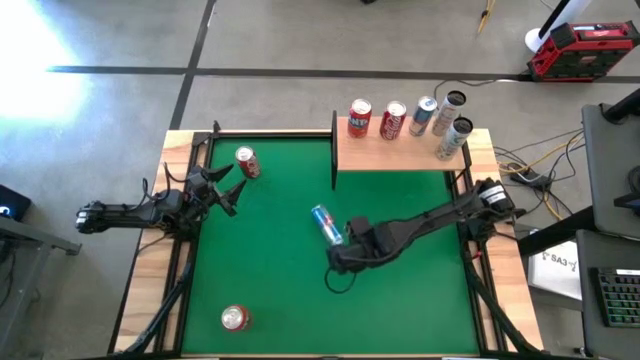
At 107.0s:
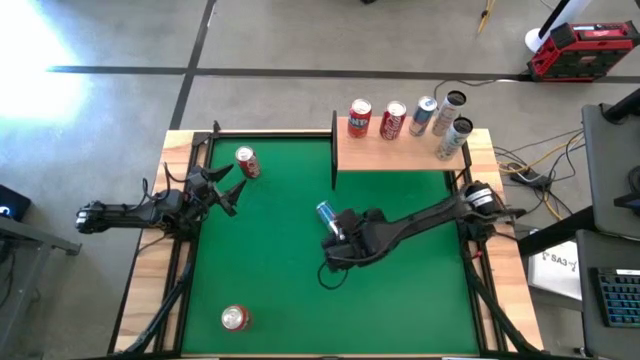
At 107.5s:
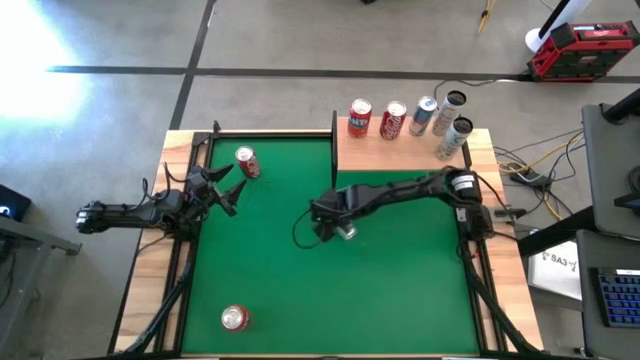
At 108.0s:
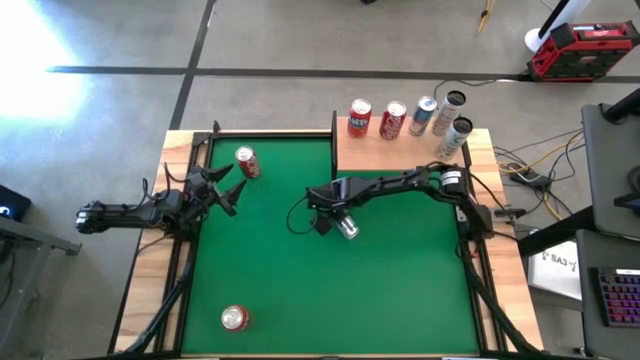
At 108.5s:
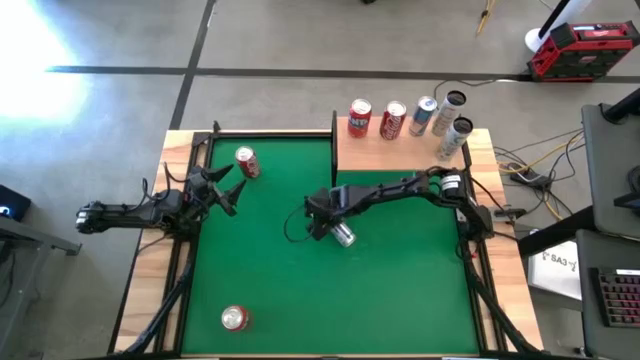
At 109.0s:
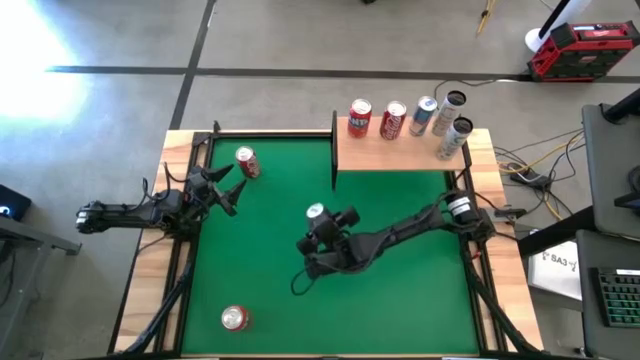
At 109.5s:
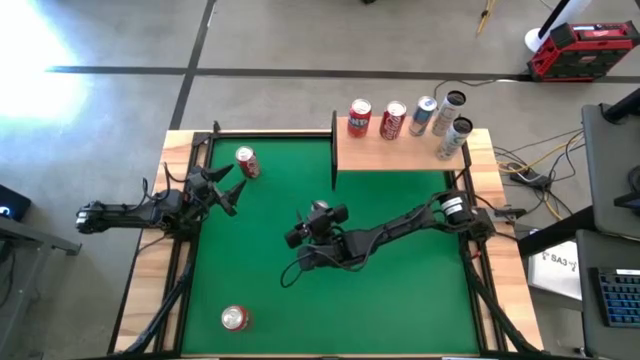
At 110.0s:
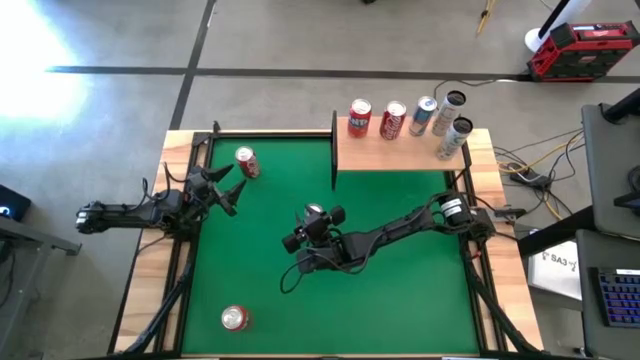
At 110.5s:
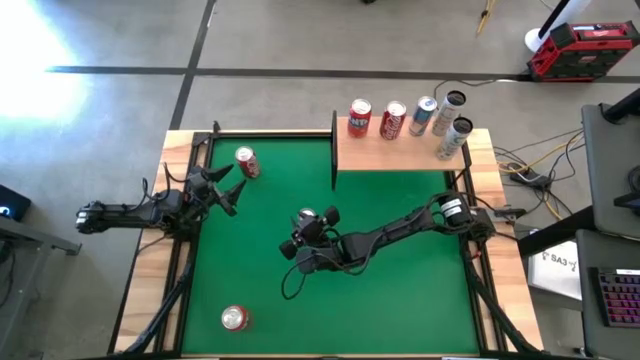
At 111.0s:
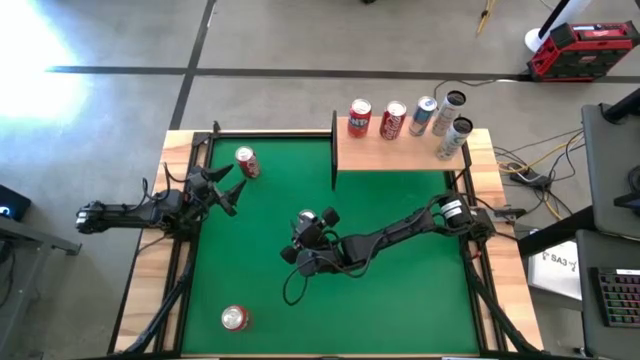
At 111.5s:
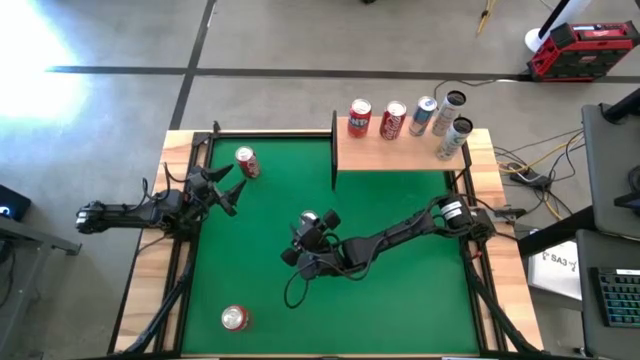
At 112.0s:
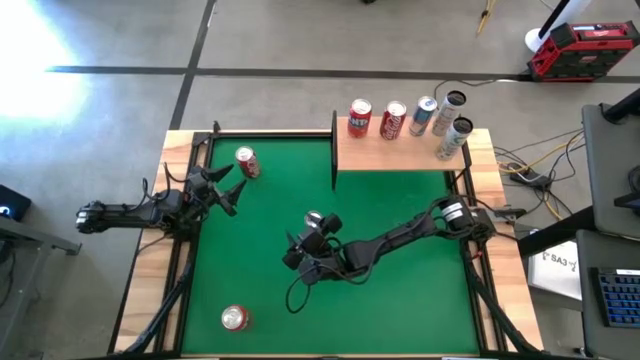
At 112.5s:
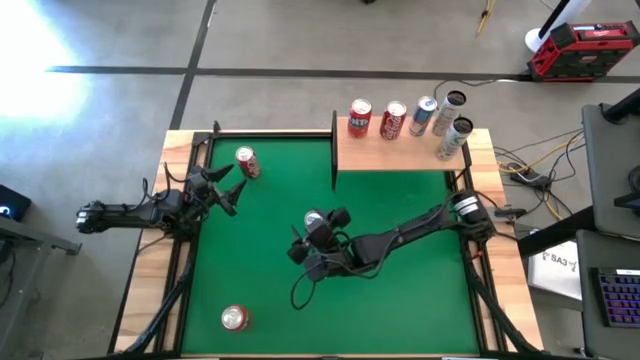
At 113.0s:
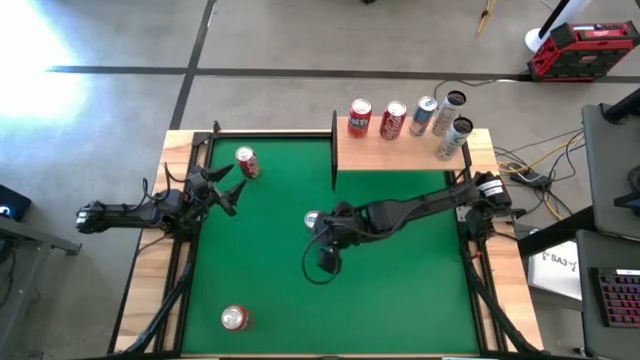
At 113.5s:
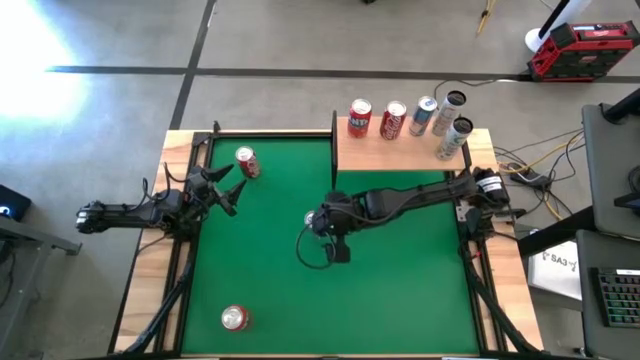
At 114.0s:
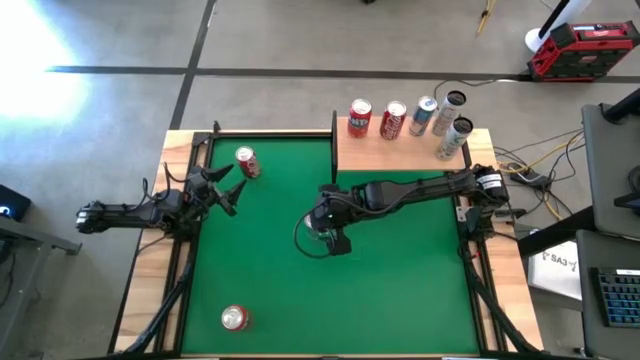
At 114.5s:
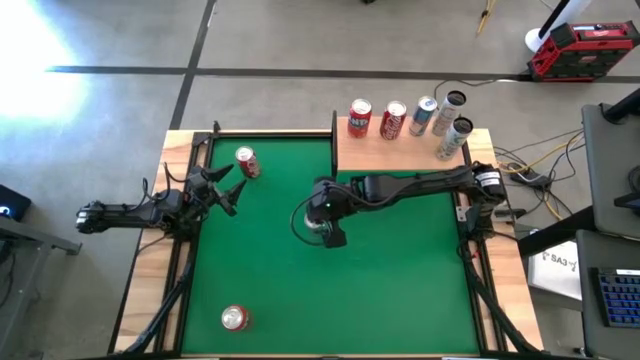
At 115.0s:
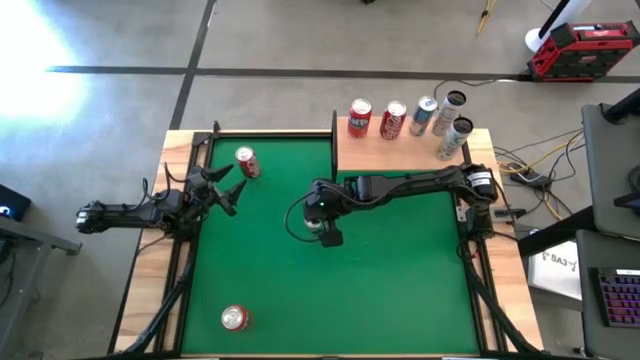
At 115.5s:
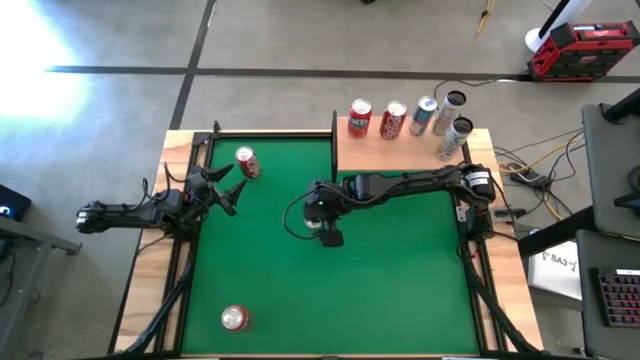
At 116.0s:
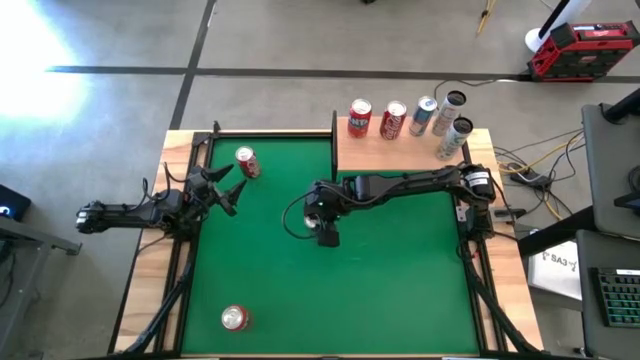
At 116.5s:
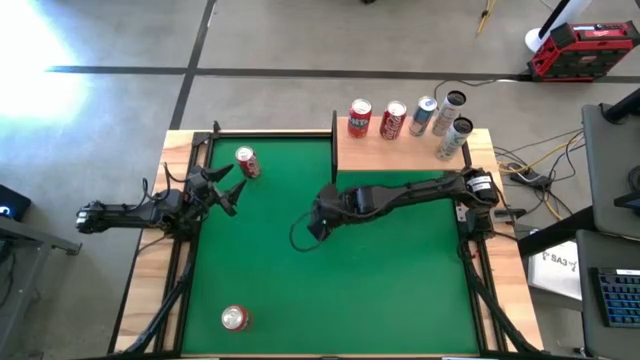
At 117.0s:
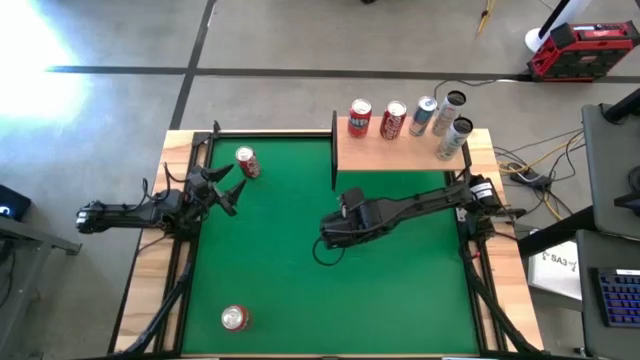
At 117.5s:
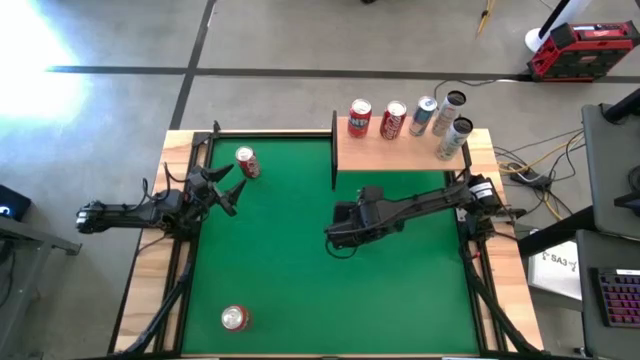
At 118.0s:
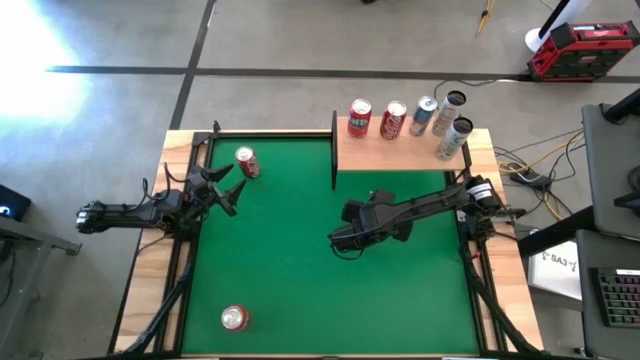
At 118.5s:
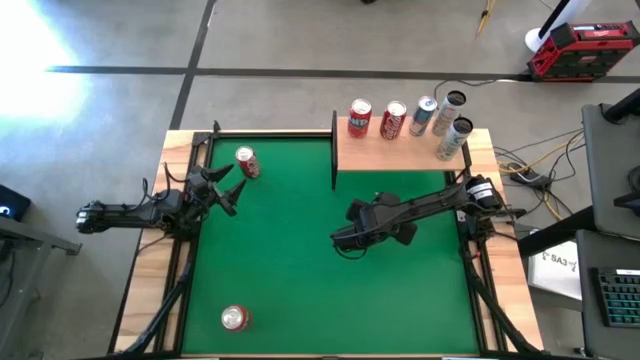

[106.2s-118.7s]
Task: Place canned beverage on shelf
Put the blue soda can on the shelf aligned with the other blue soda can

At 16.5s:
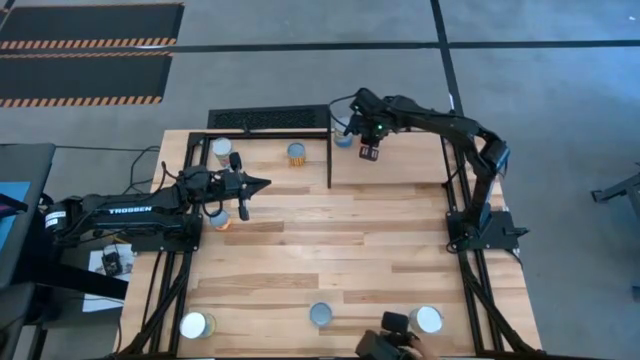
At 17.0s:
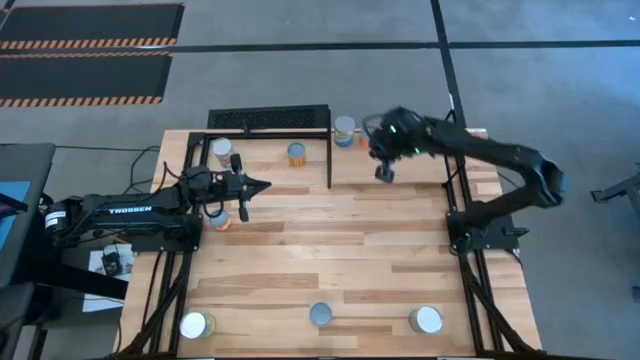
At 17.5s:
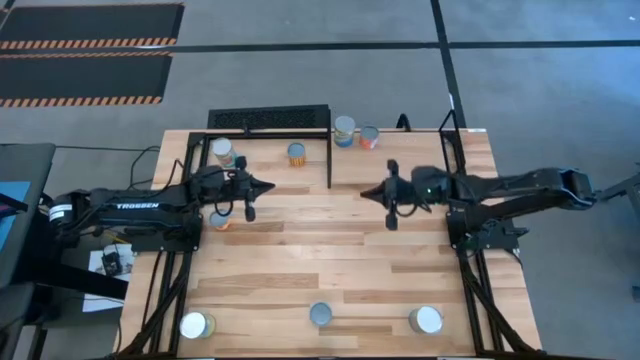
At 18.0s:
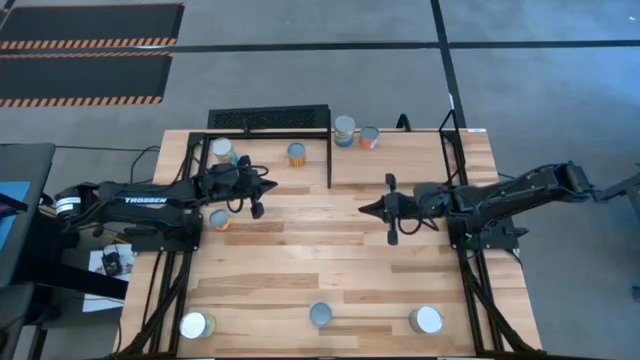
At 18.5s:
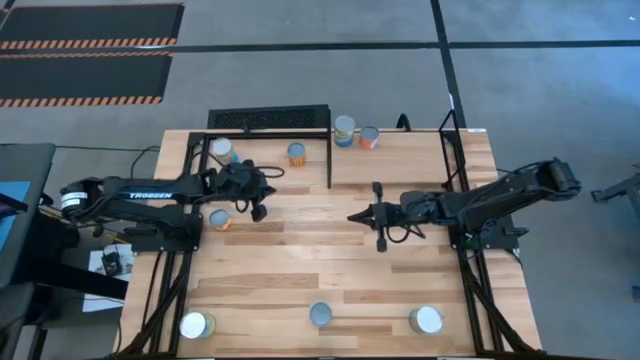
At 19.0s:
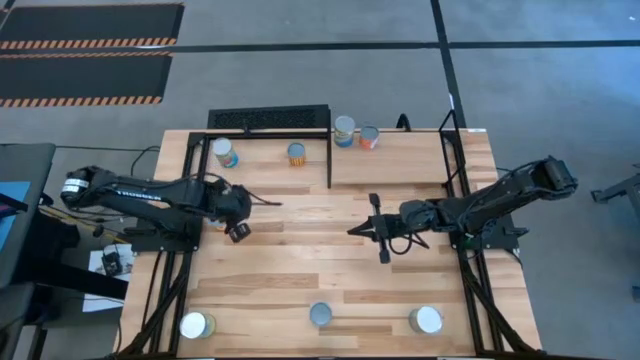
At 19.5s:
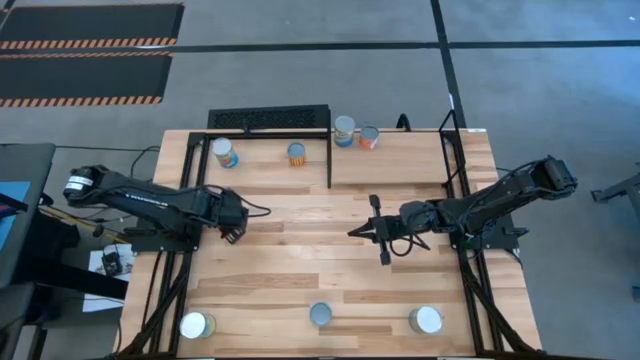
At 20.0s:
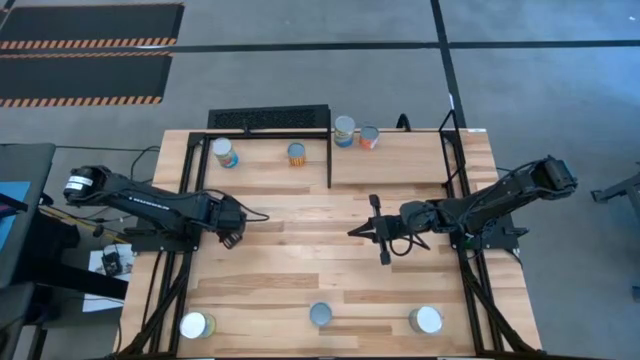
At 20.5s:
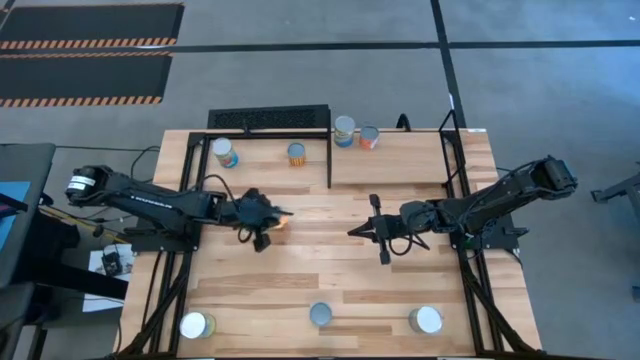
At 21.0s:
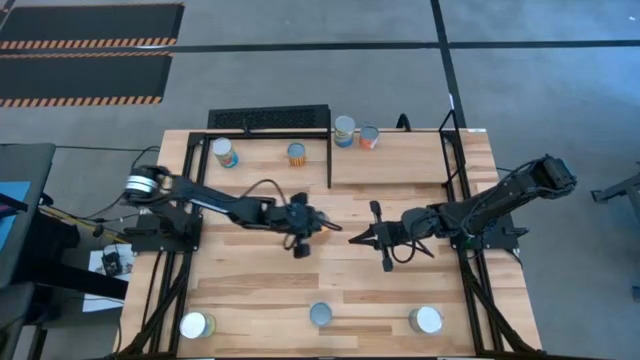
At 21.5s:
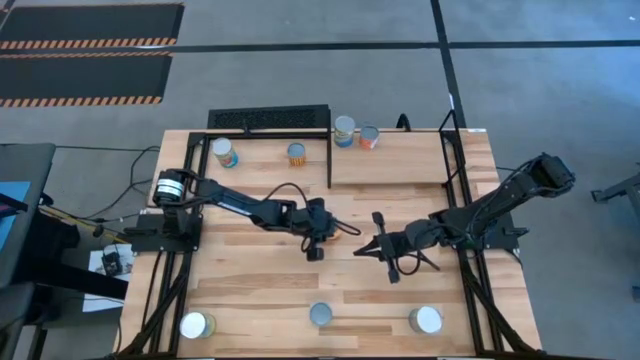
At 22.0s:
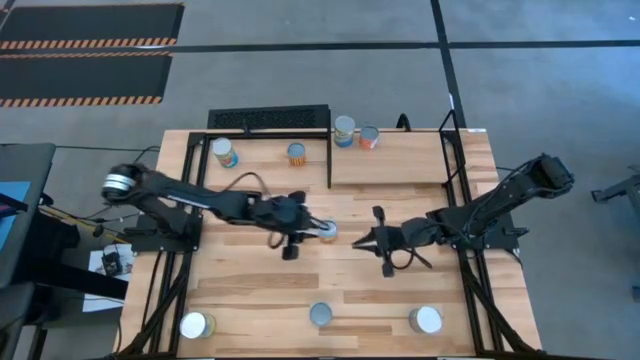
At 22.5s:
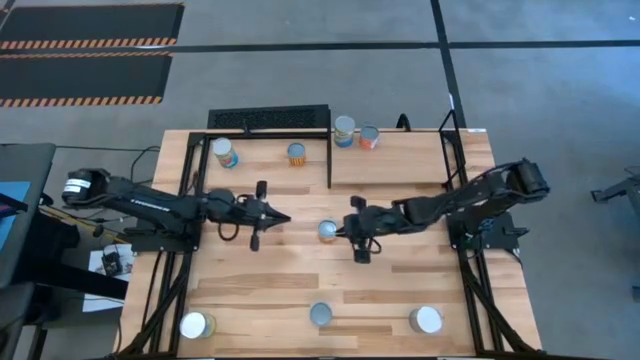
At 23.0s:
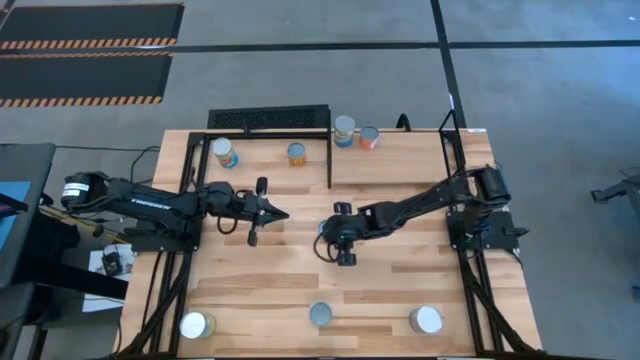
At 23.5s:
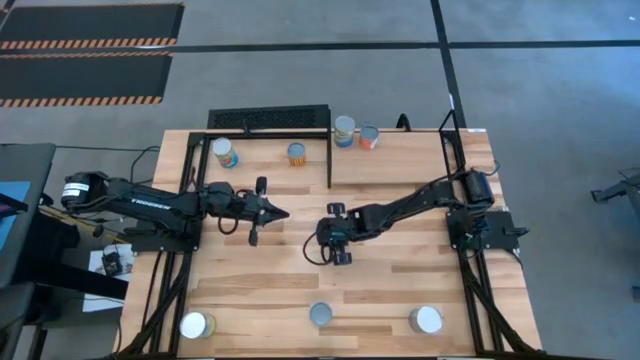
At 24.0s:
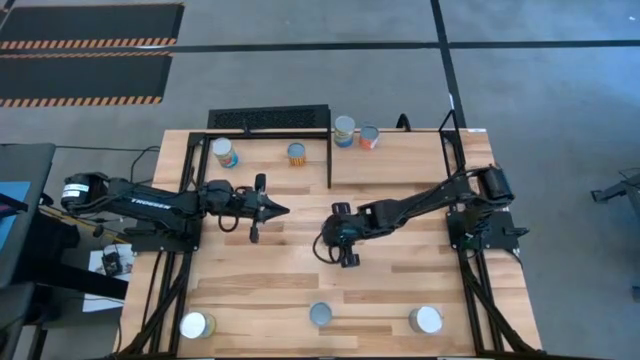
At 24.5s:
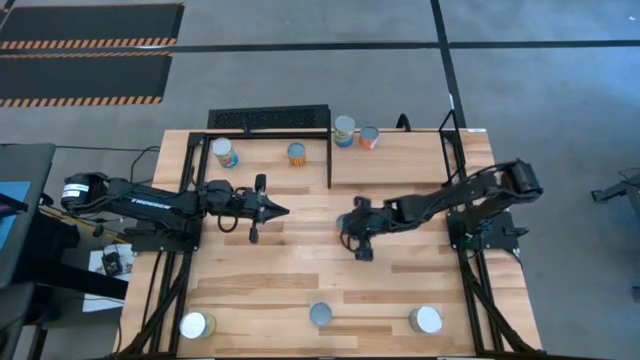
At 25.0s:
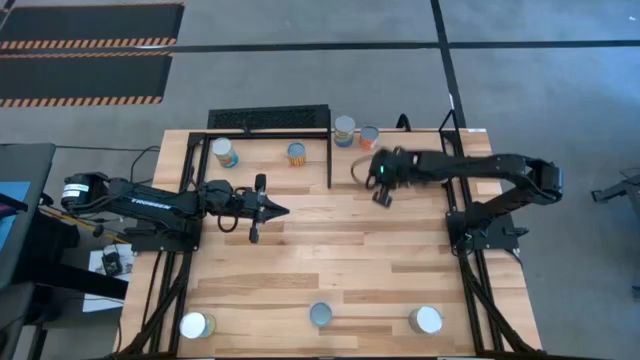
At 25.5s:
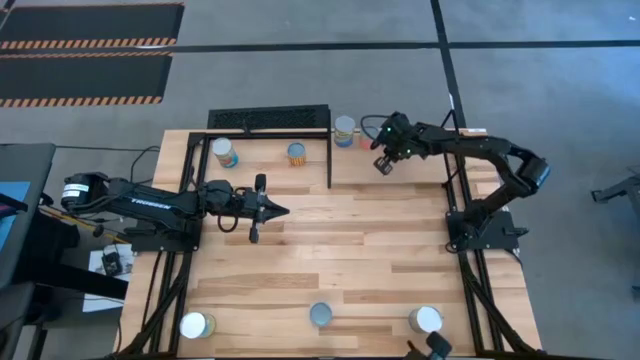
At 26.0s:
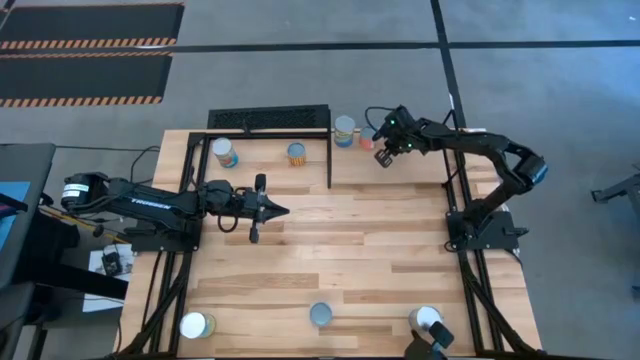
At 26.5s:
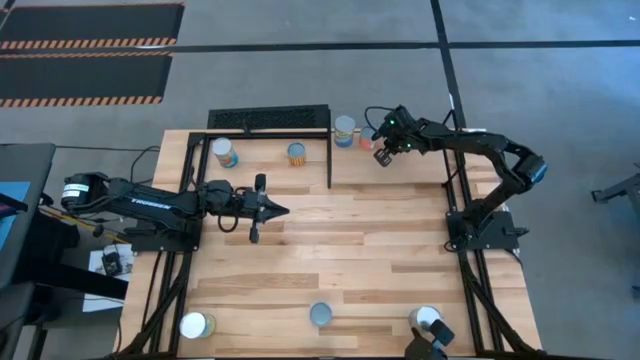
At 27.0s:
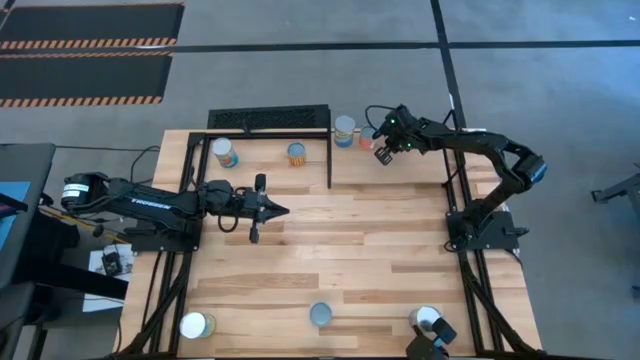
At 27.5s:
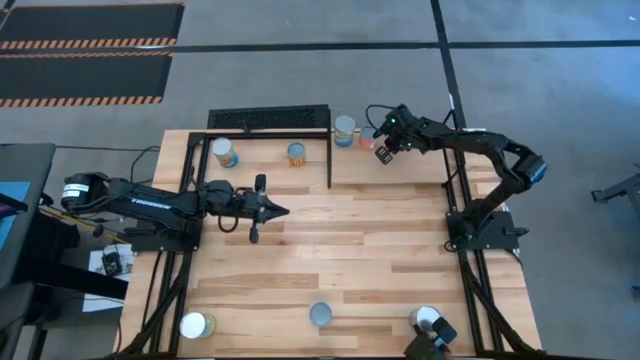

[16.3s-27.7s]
Task: Pick and place cans onto a shelf
Put the canned pineapple rings on the shelf
